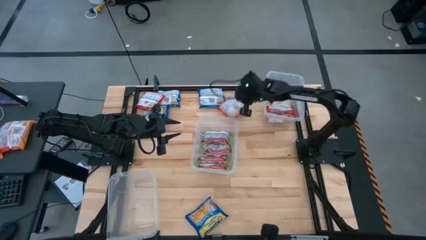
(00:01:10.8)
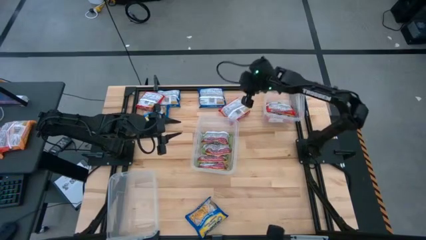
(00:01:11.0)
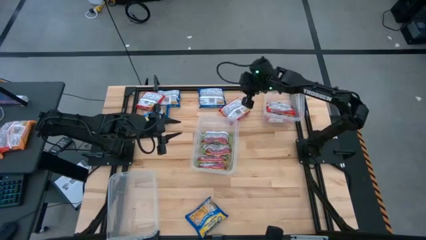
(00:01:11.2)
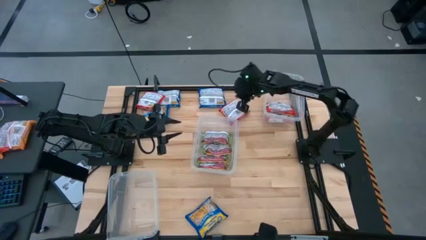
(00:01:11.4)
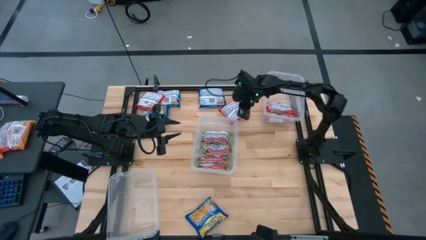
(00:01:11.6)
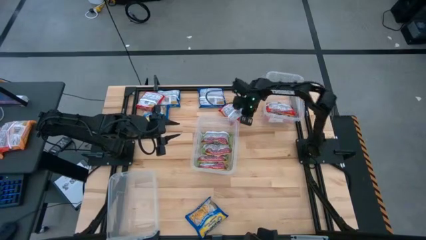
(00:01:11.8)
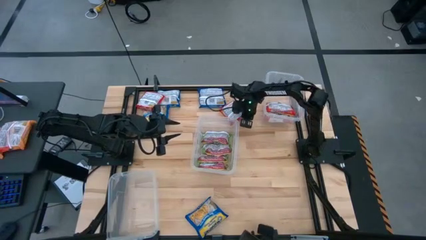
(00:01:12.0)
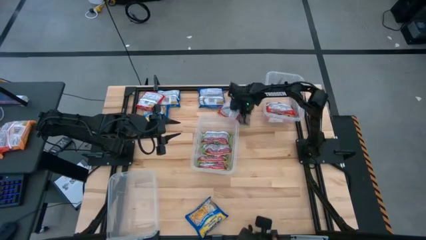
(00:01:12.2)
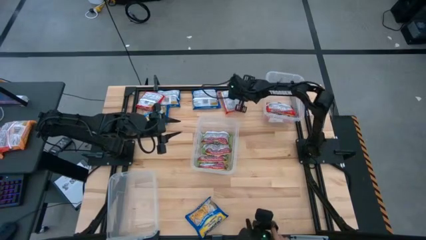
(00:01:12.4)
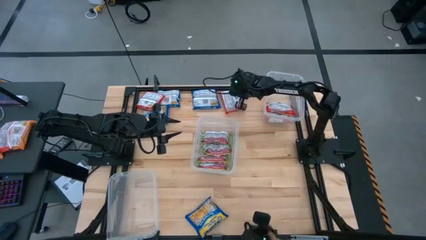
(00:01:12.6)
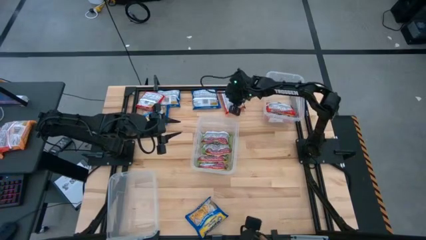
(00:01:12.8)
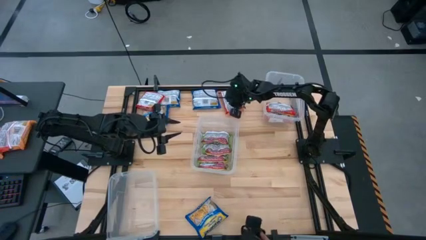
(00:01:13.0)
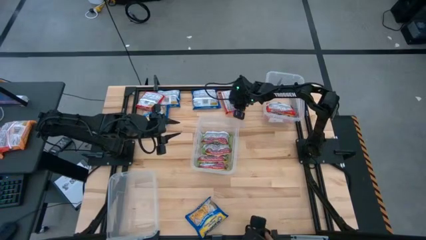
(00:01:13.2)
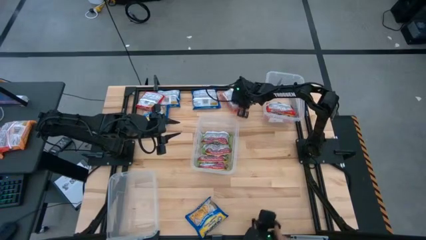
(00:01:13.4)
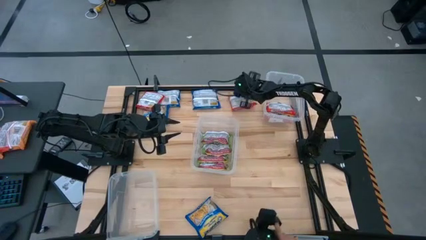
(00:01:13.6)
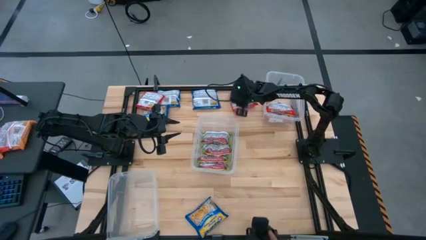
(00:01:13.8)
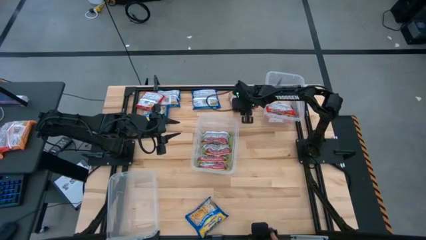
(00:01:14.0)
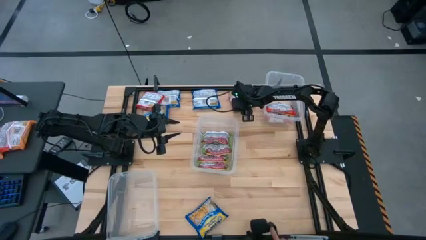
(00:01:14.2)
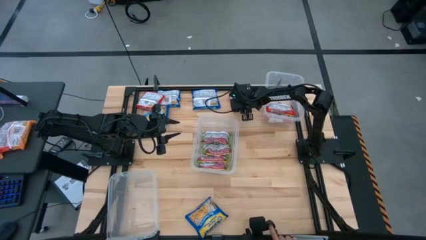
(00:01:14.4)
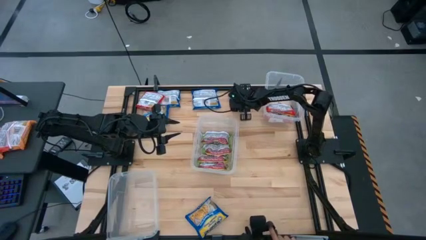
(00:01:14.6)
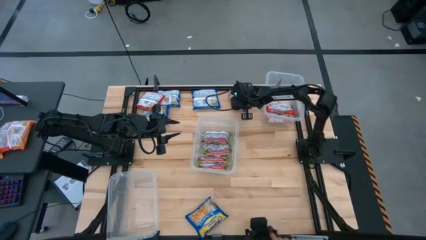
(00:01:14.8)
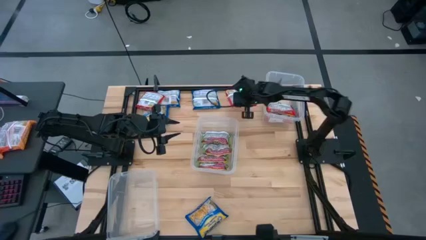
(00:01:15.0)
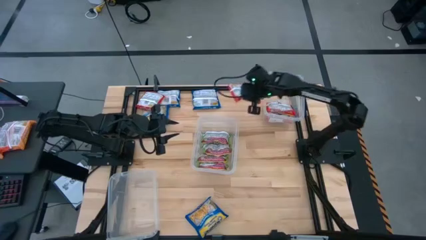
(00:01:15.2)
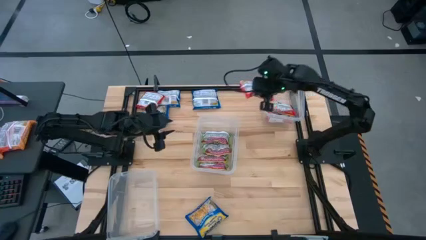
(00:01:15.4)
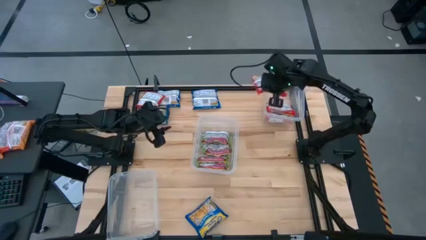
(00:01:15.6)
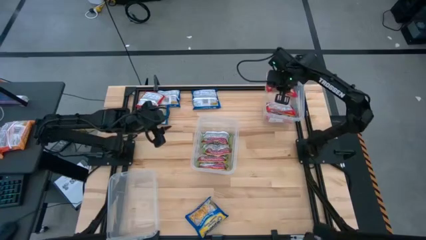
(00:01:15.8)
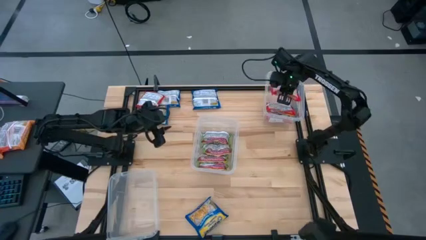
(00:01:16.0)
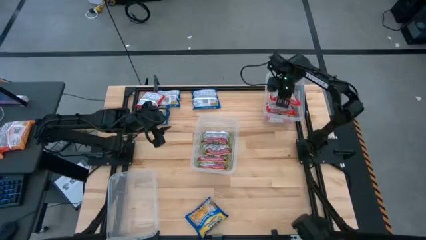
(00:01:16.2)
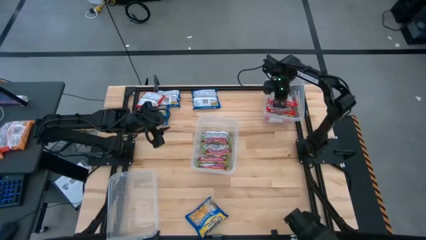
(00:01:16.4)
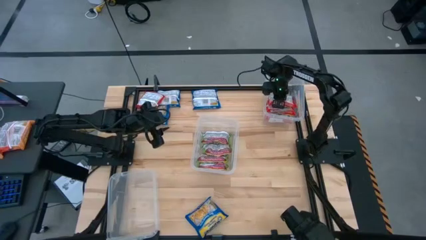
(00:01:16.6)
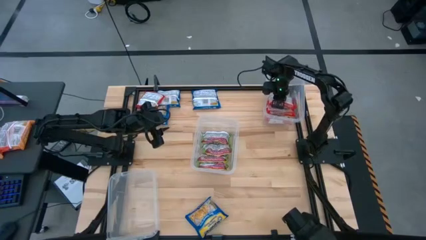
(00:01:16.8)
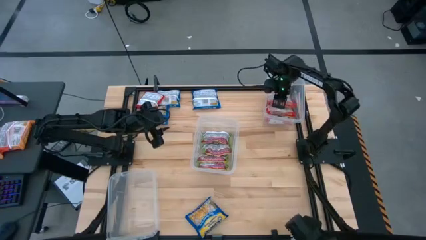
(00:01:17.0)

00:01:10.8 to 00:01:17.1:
Task: Sort Maruchan noodles
Put the red noodle pack into the top transparent container

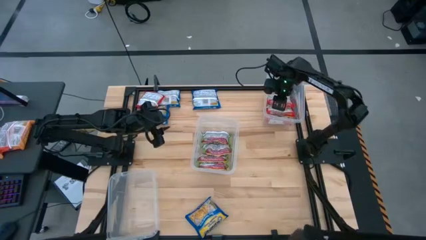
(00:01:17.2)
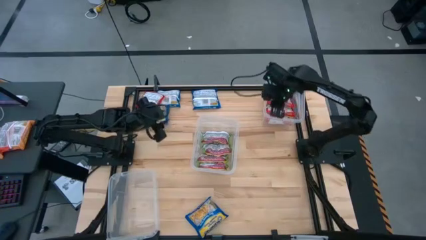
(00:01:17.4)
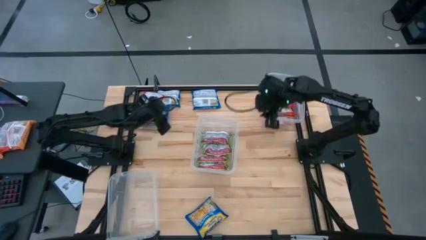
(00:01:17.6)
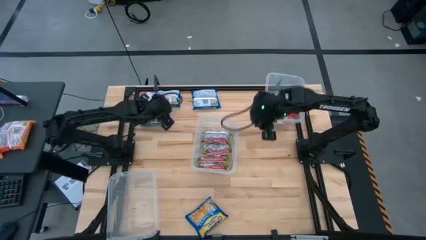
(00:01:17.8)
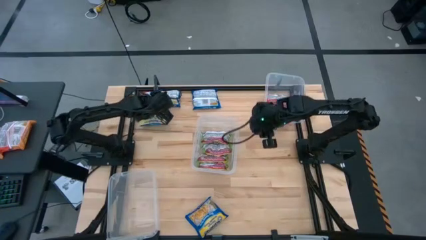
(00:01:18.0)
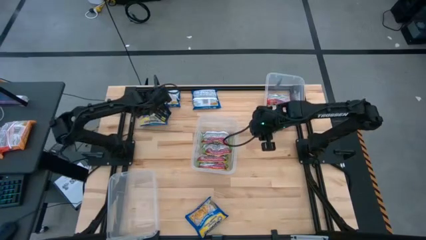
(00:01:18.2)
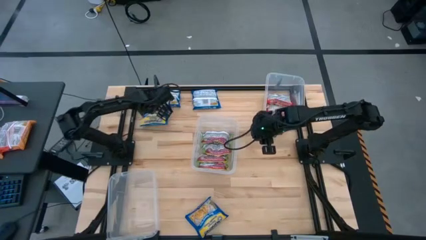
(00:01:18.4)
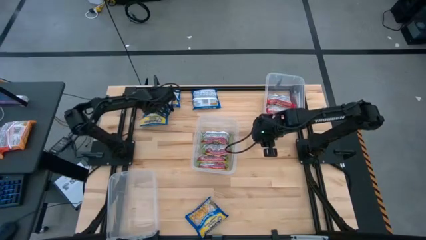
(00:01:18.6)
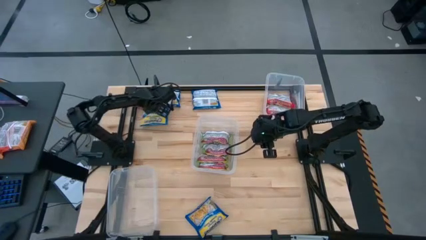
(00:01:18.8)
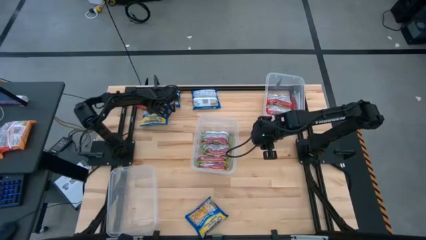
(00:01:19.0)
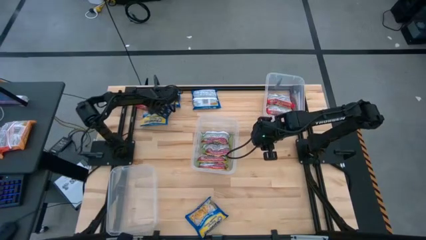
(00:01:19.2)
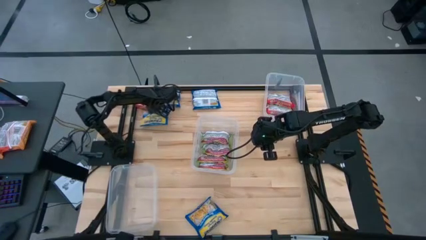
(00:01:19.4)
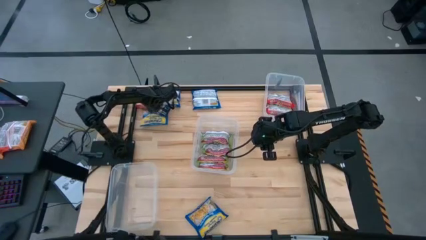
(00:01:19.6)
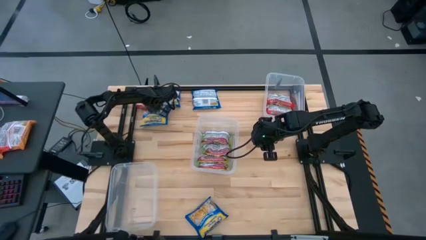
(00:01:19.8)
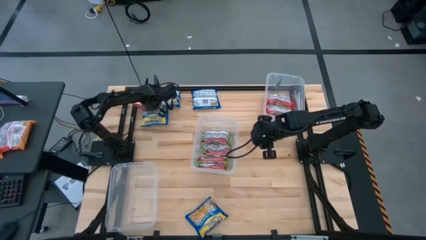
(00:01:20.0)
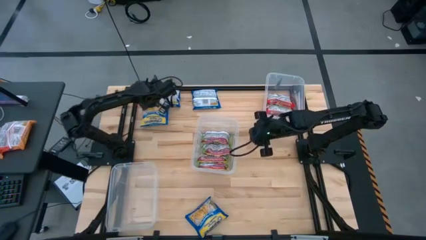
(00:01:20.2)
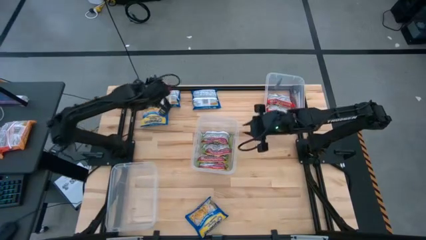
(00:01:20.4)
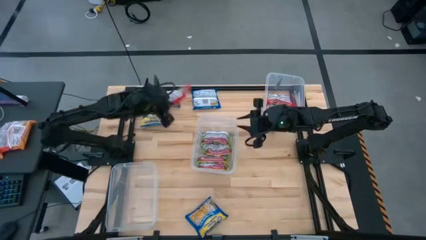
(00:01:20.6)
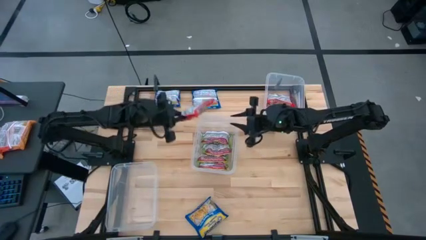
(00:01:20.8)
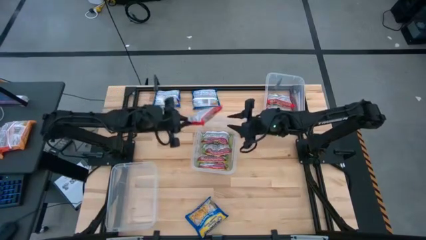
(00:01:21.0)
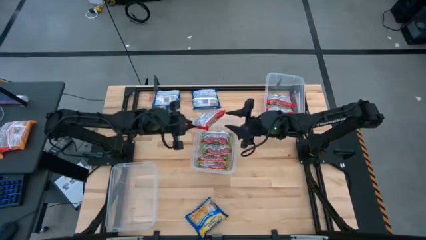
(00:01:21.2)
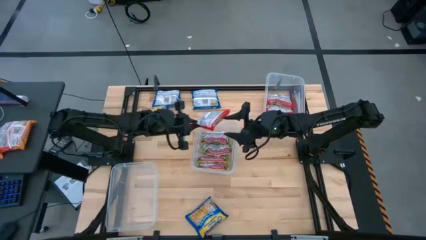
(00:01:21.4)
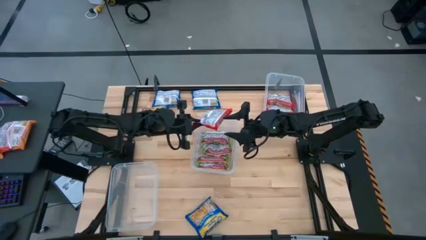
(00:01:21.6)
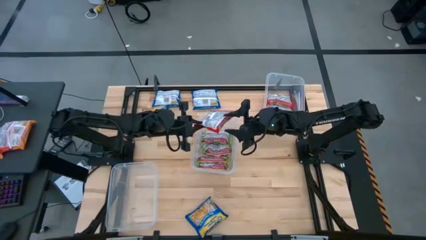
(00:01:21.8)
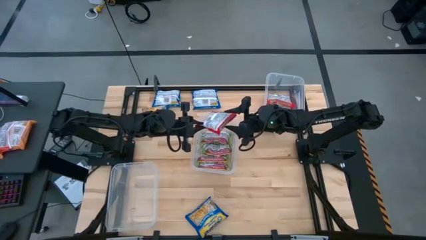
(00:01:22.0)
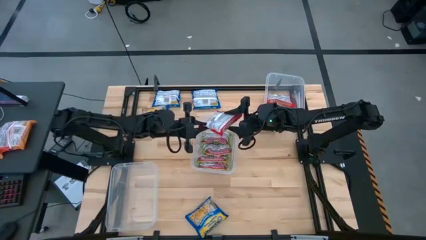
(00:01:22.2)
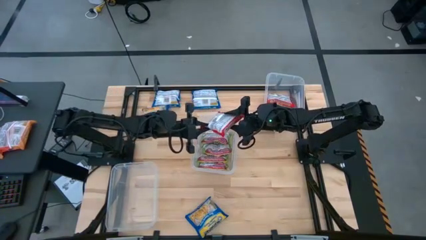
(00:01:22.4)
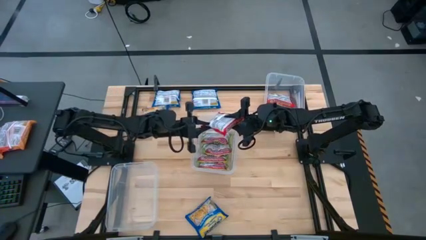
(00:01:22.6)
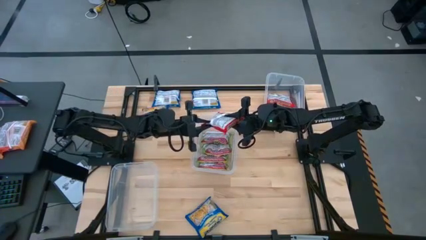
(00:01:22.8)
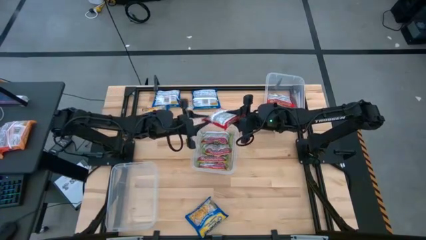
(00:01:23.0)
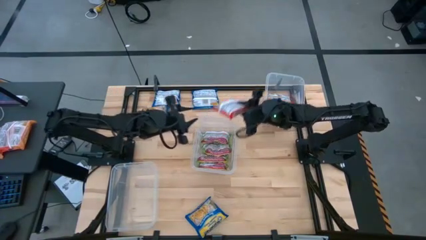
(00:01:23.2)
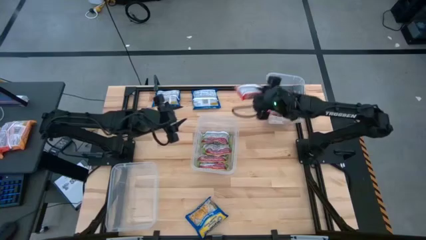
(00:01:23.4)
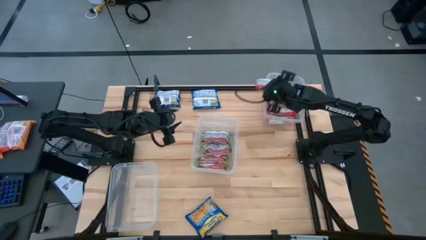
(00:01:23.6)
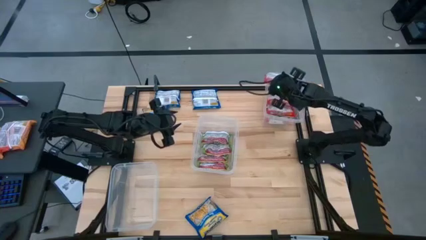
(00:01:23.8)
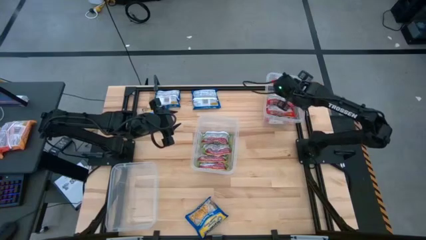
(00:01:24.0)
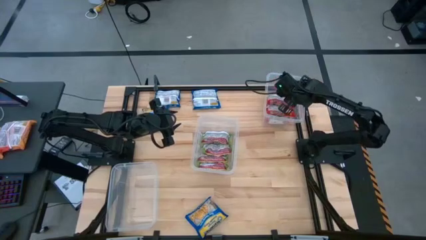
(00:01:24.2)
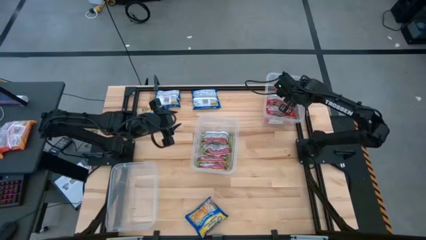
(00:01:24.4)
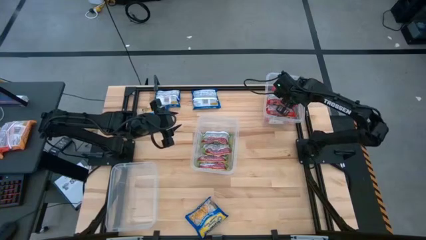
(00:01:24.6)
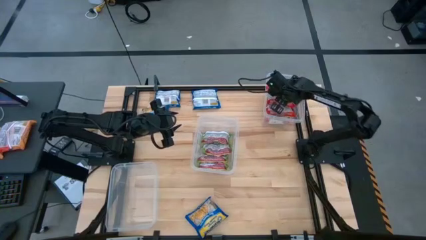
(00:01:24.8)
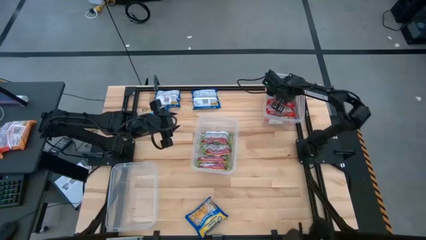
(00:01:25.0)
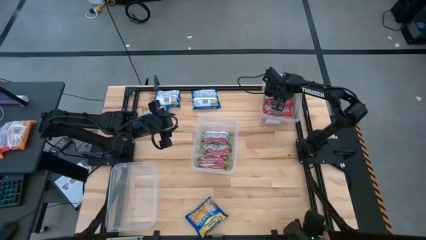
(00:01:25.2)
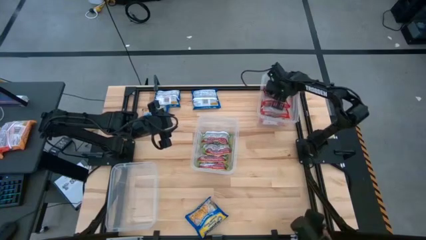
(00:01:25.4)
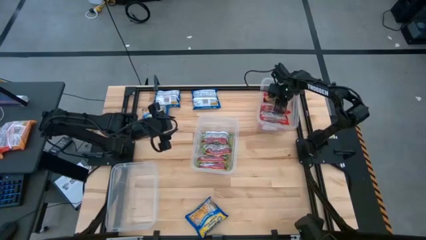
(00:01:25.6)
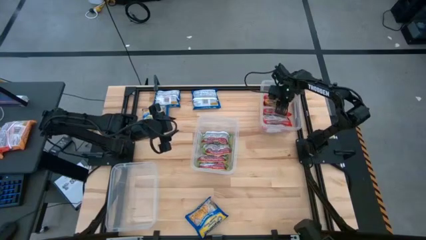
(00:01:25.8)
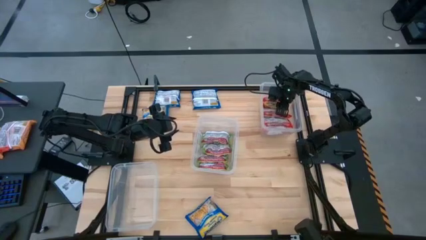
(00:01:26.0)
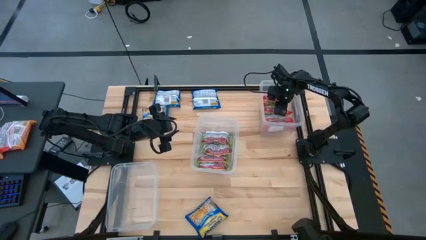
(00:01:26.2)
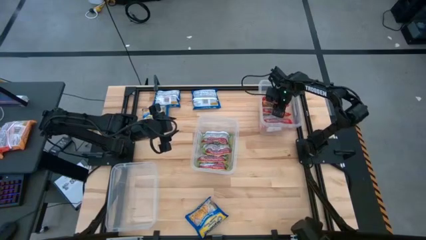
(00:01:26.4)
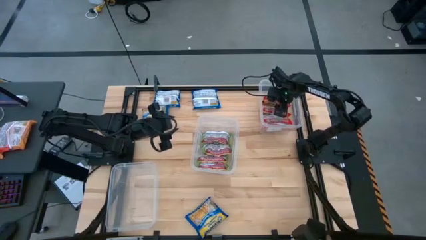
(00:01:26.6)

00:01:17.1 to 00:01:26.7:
Put the red noodle pack into the top transparent container
